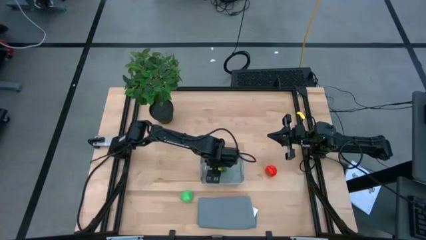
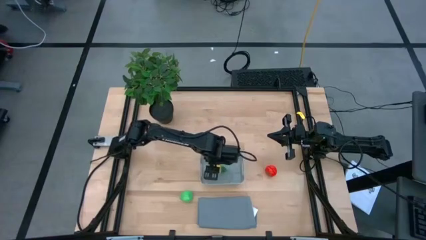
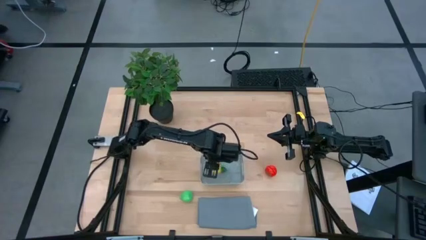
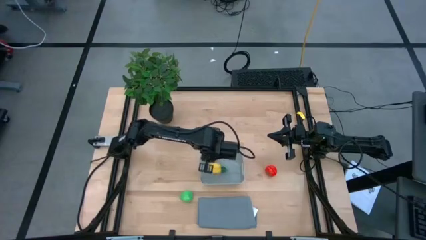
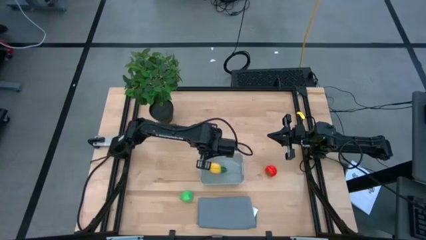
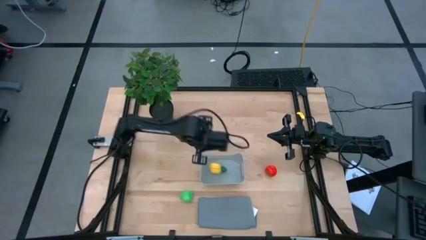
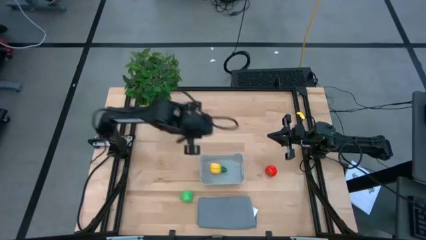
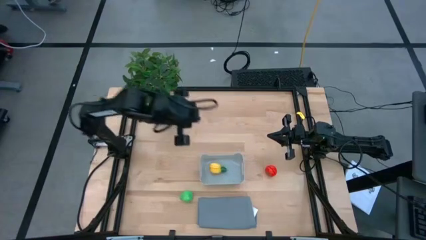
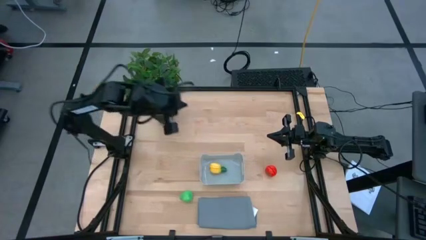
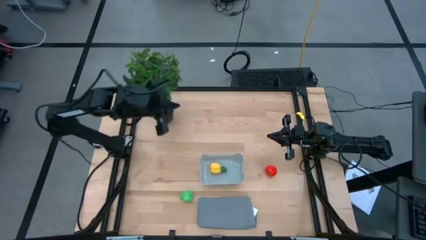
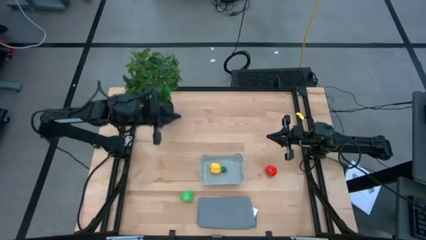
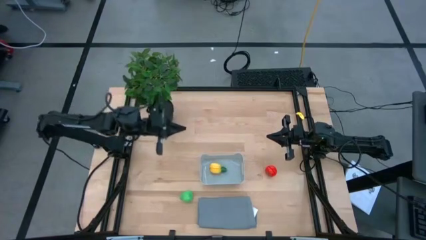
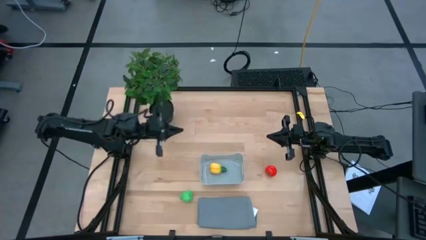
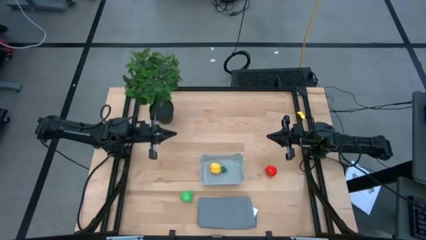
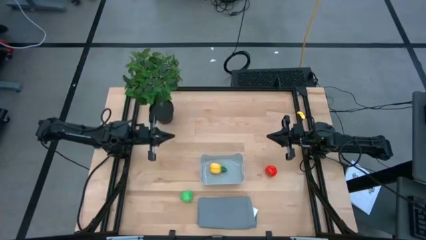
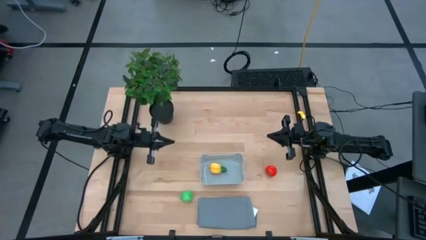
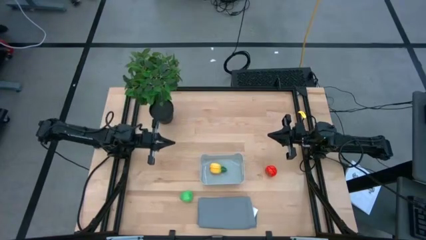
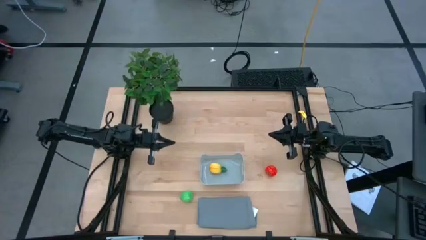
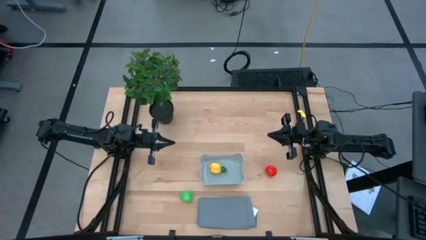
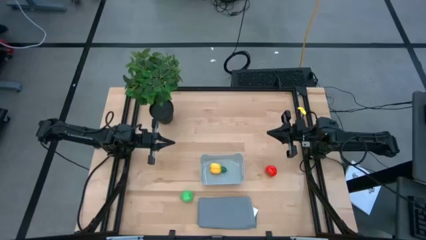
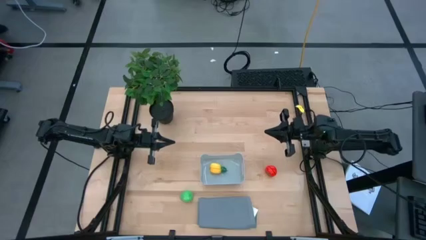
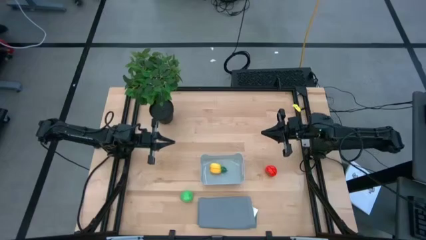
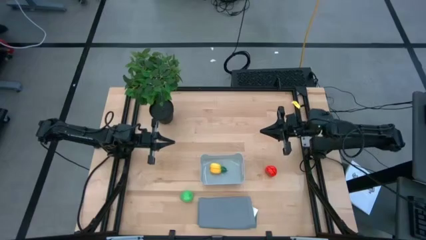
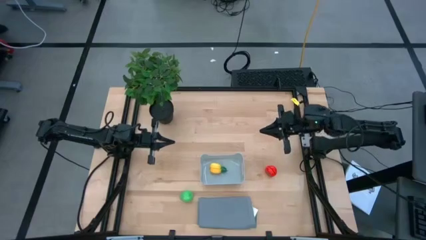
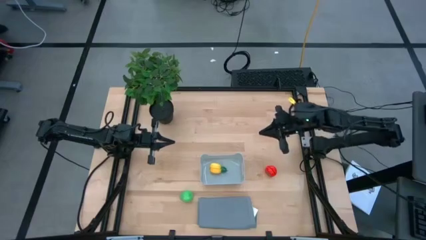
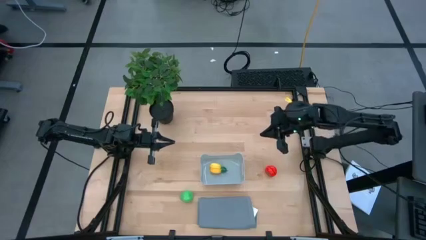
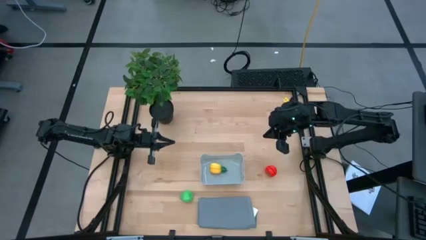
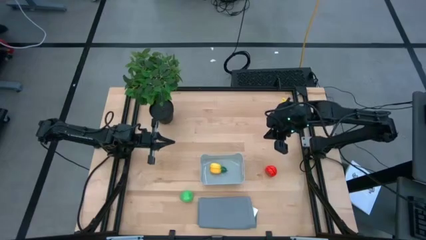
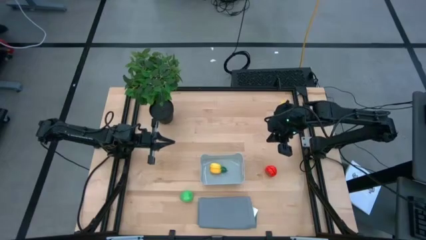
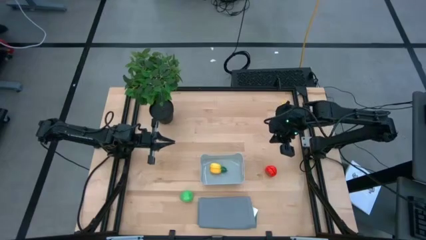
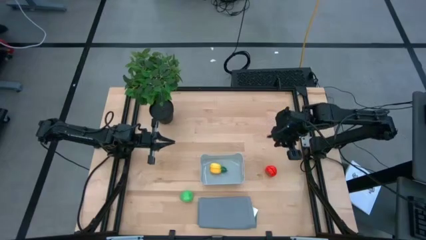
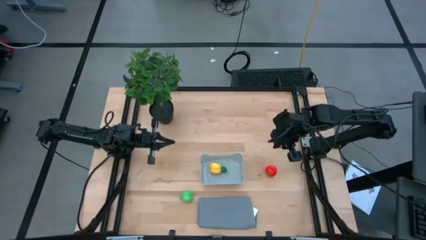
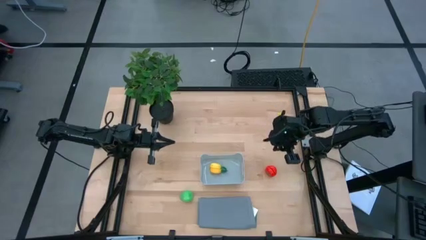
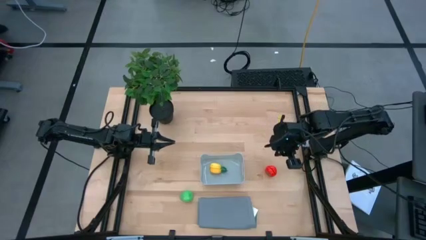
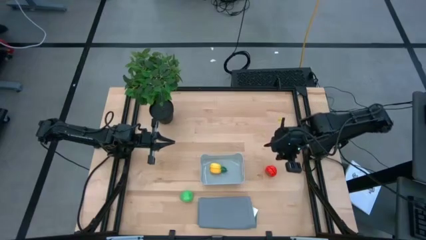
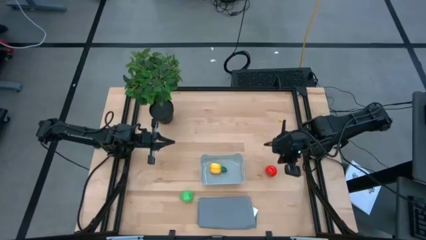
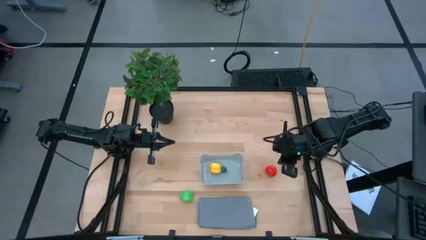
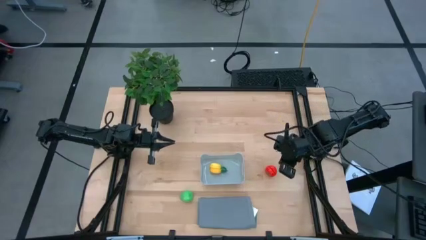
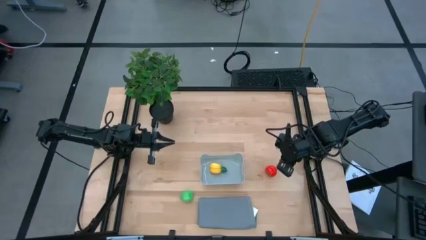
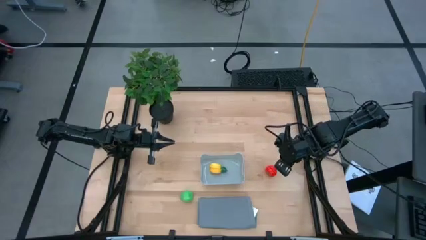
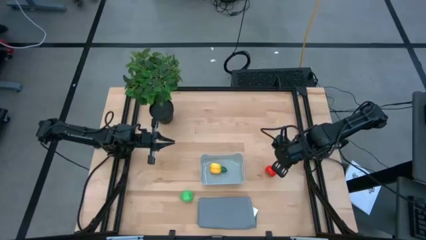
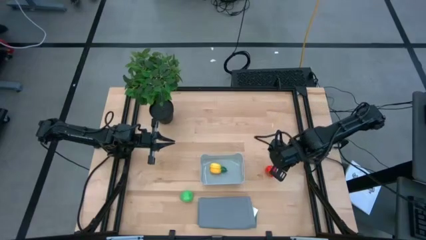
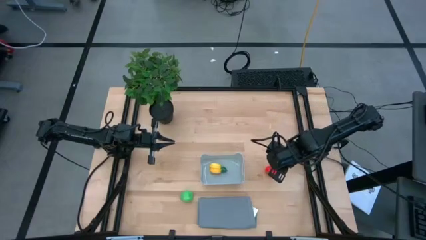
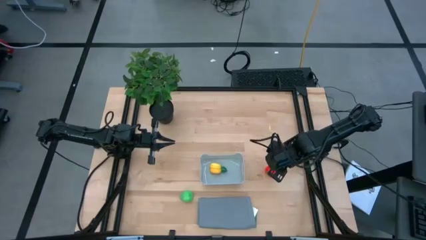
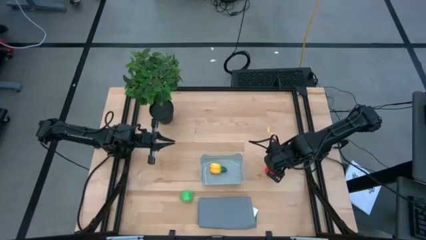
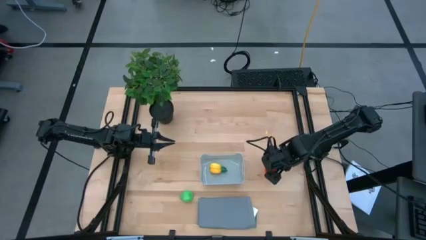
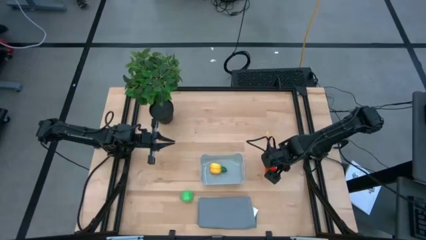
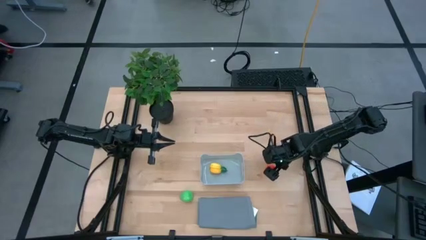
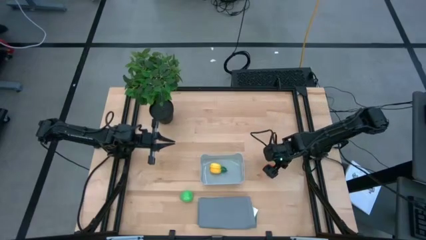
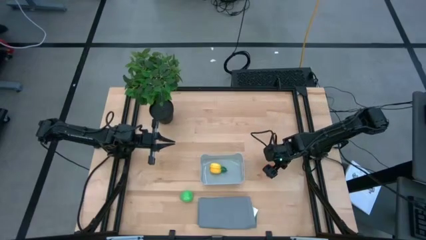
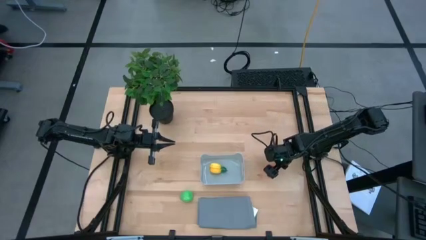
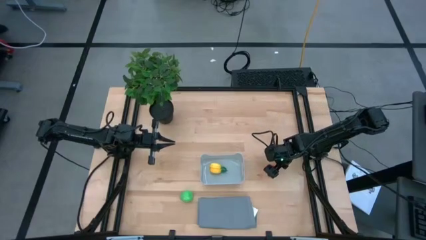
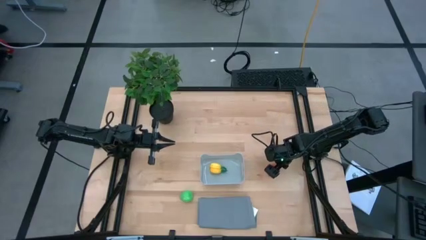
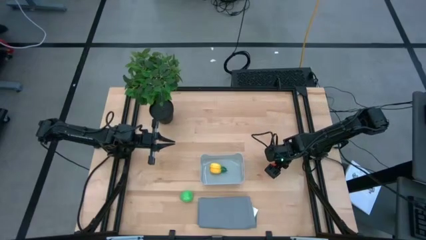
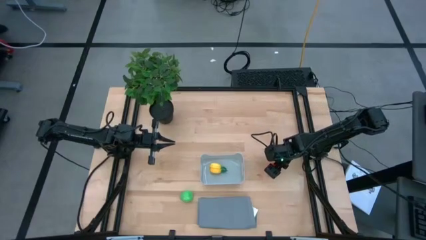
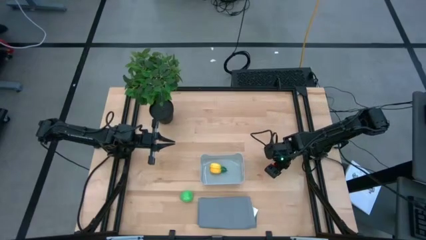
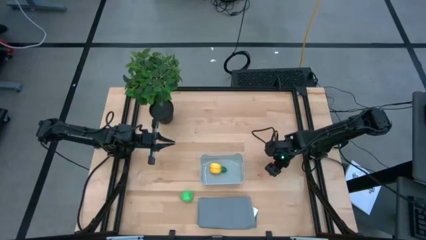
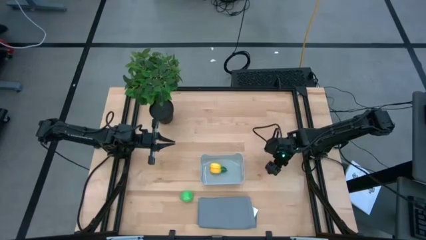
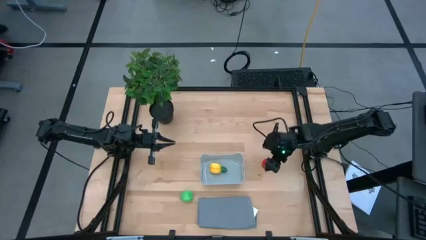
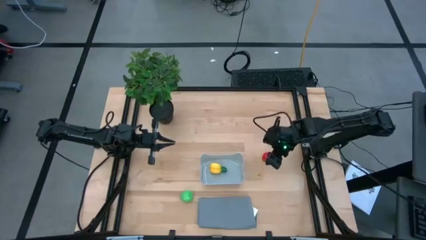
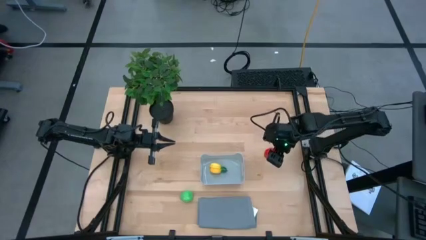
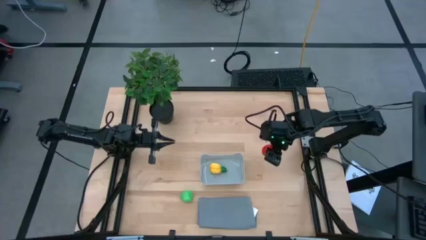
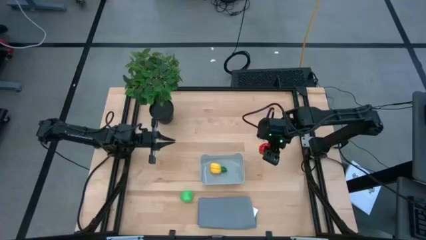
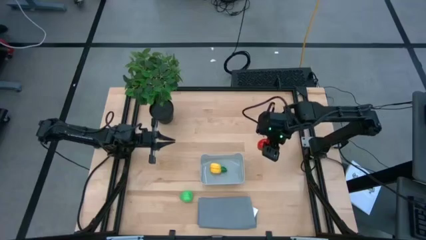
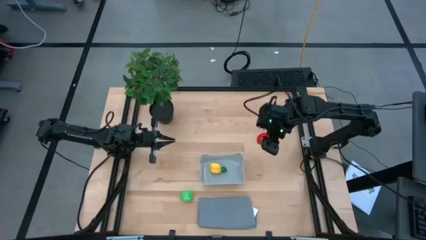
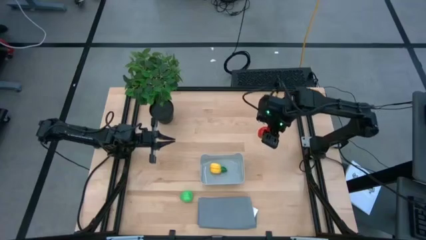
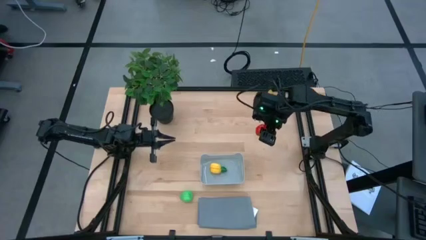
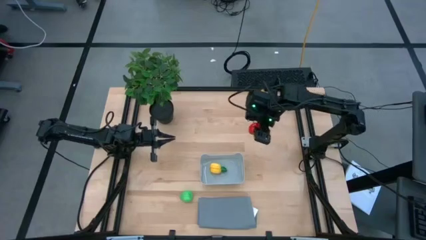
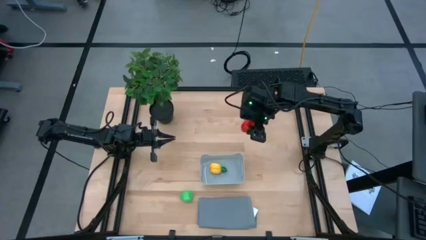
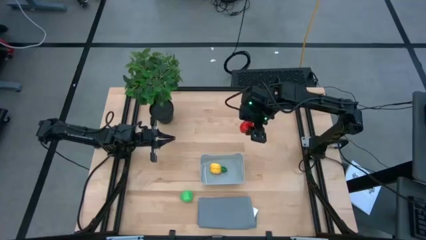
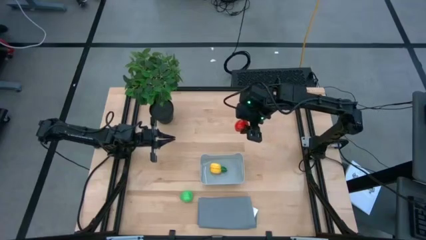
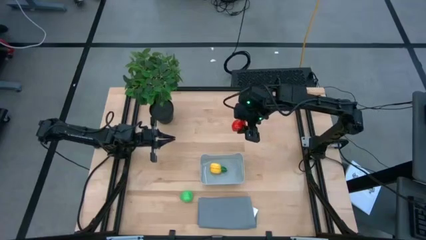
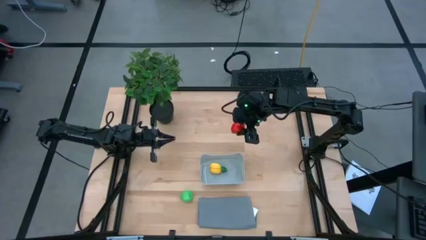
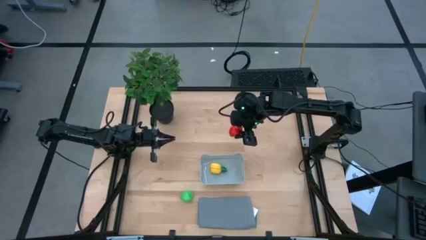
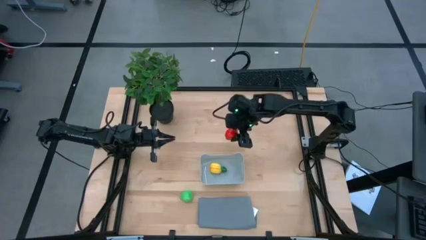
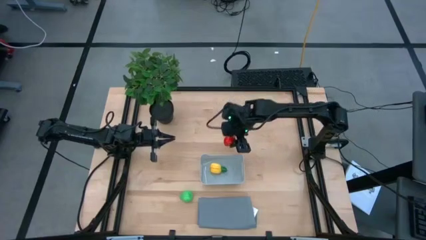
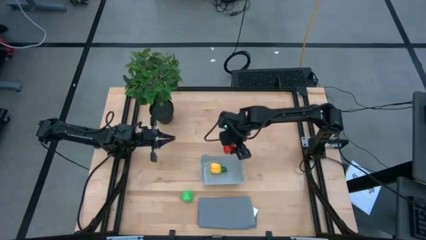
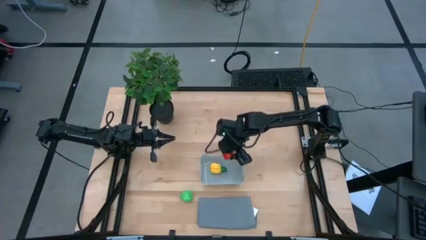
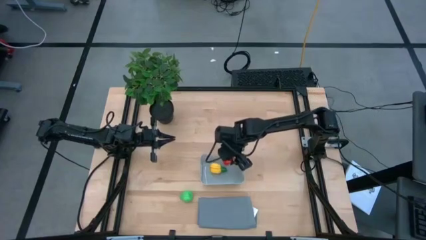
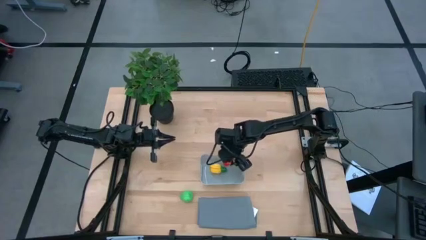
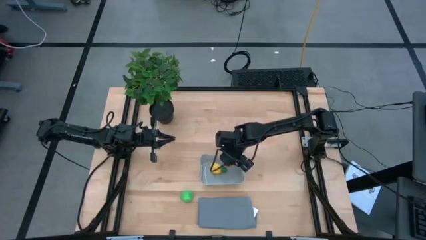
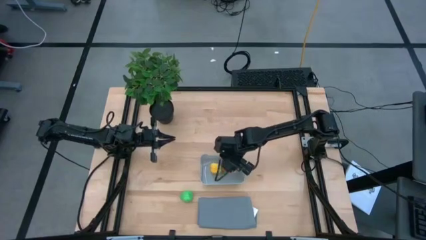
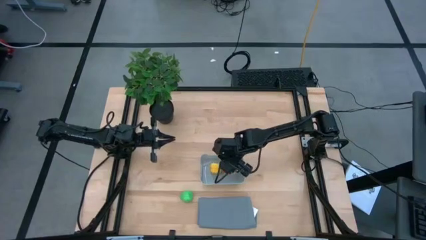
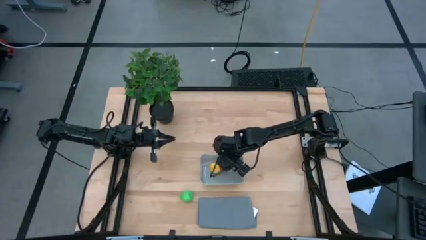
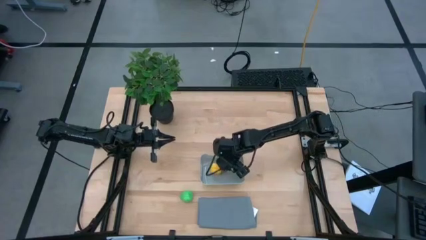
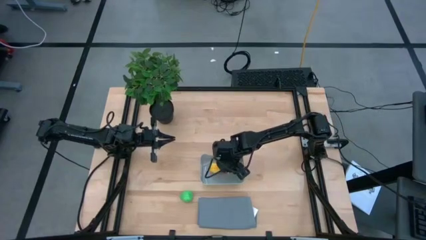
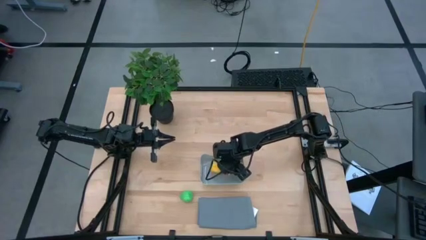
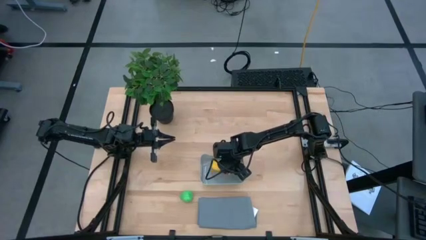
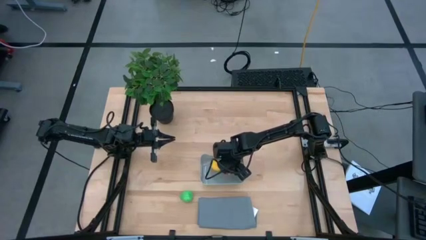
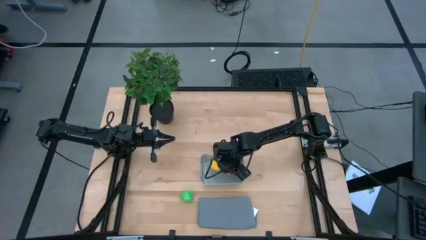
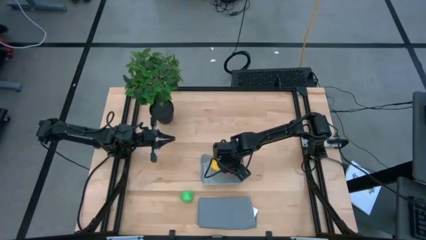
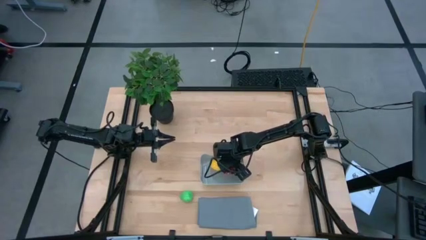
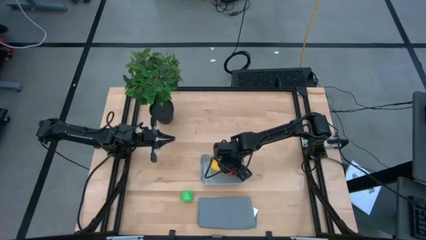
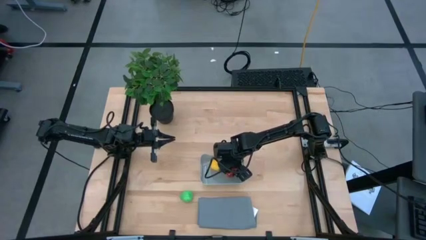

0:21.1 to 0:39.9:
Task: Pick and placing Produce into tupperware
Put the red tomato into the gray bin
